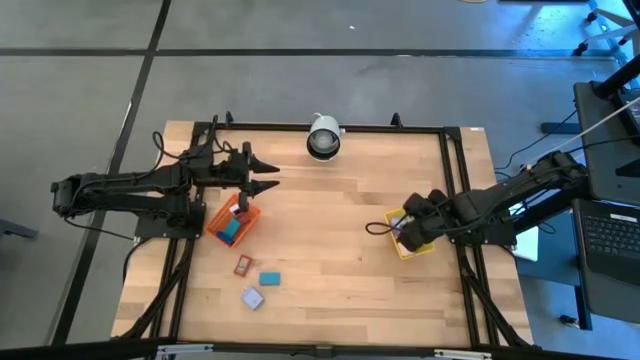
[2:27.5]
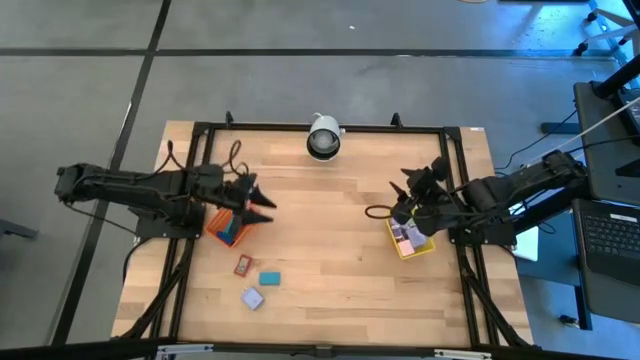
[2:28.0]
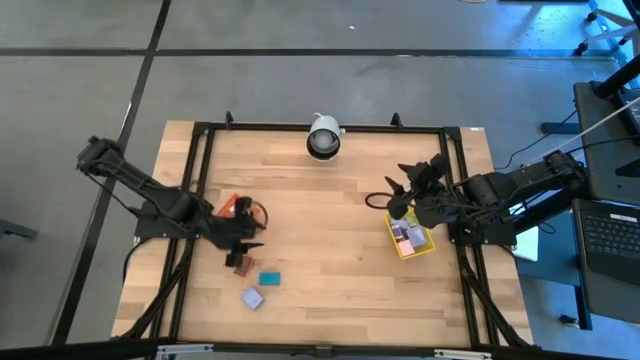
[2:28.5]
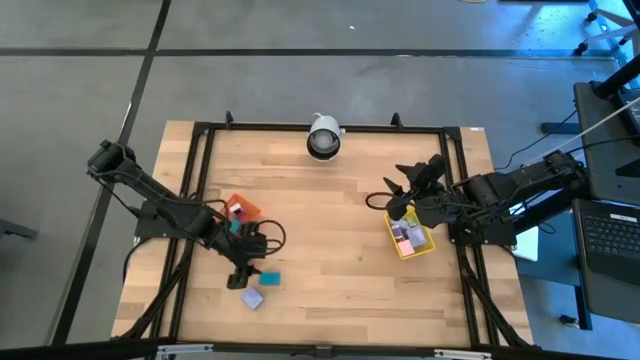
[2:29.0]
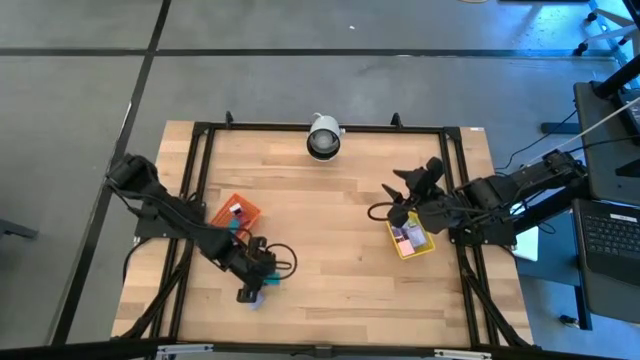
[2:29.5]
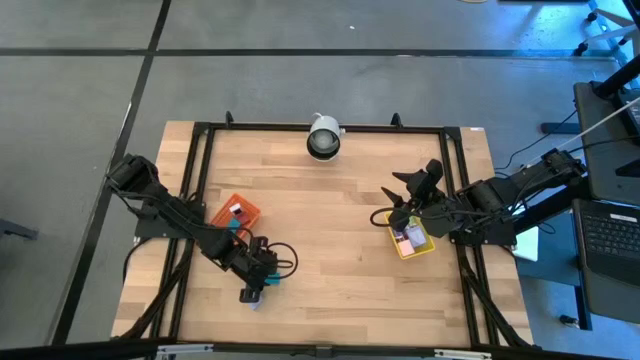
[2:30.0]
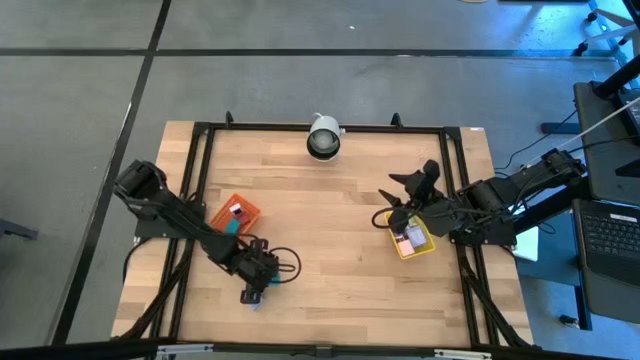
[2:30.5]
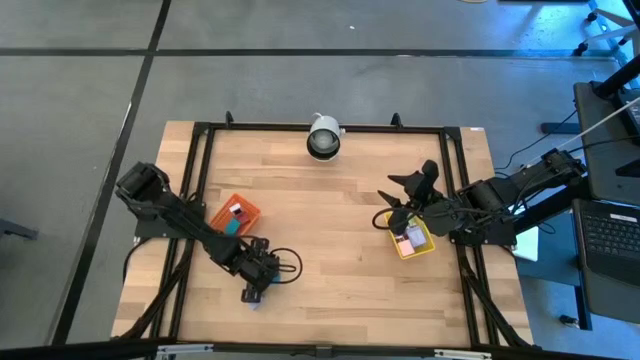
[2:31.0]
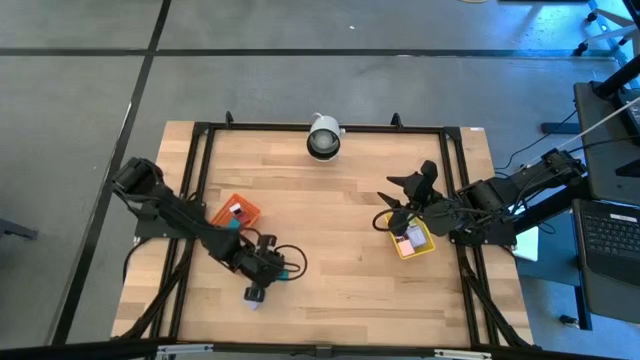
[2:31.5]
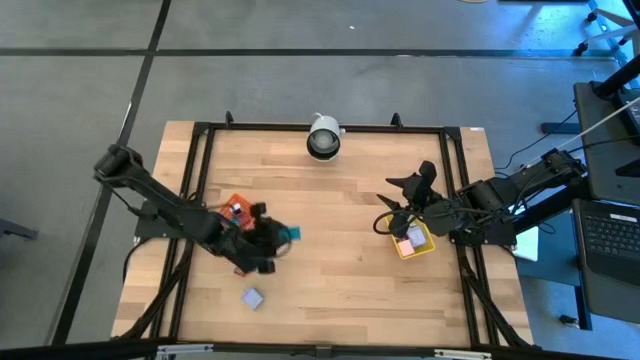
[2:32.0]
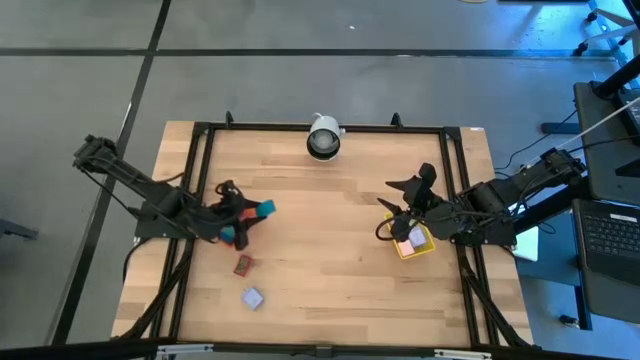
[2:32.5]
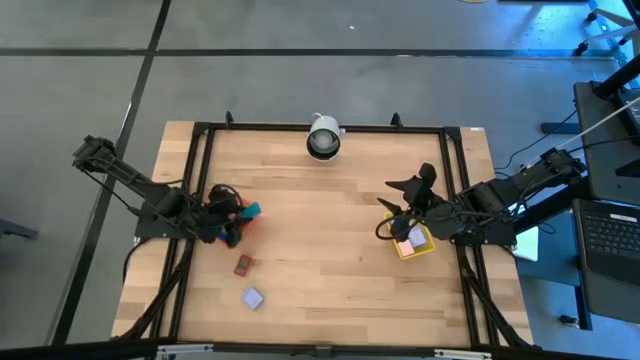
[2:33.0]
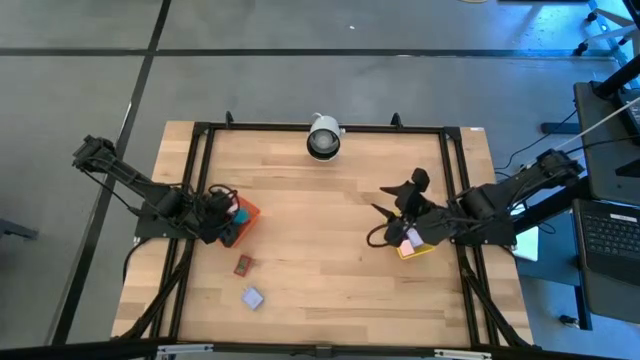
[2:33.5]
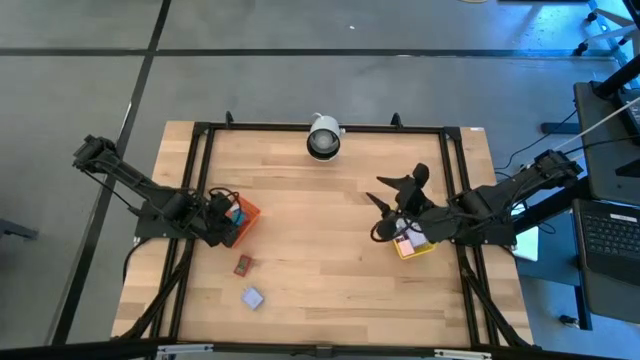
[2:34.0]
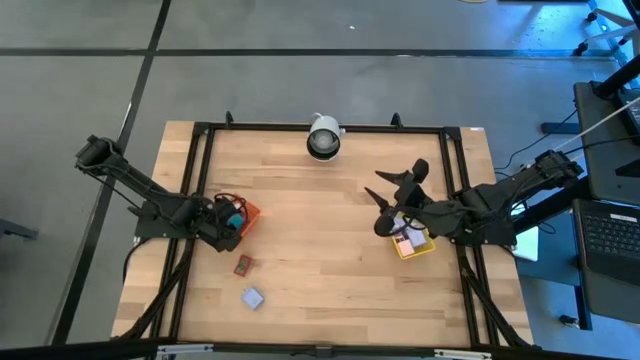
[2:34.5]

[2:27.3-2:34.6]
Task: Pick & Place Office items
Put the light blue digital clock into the orange basket

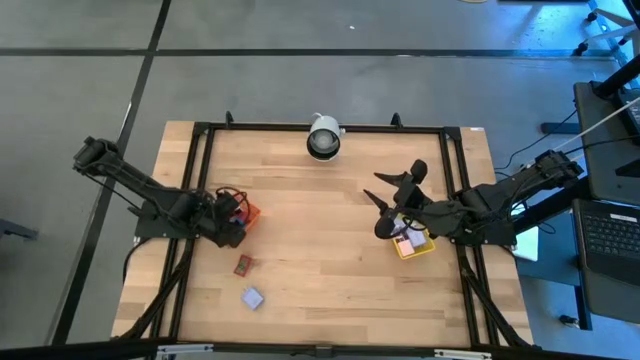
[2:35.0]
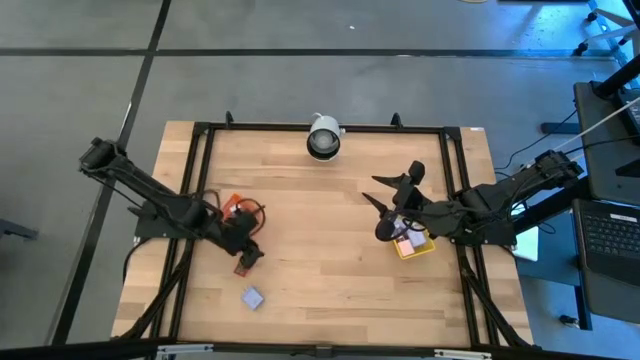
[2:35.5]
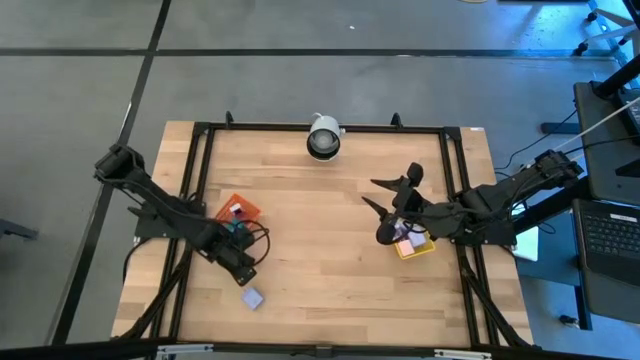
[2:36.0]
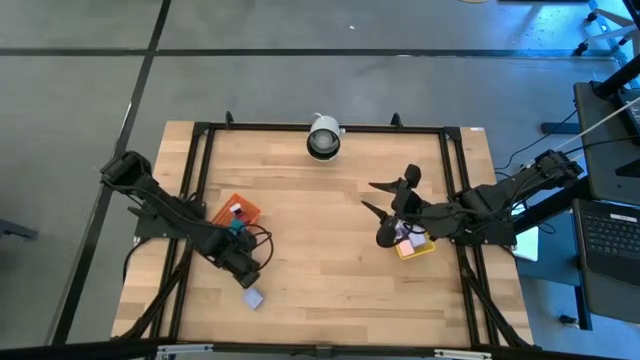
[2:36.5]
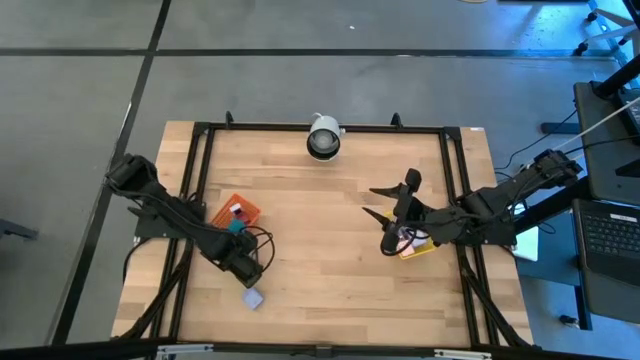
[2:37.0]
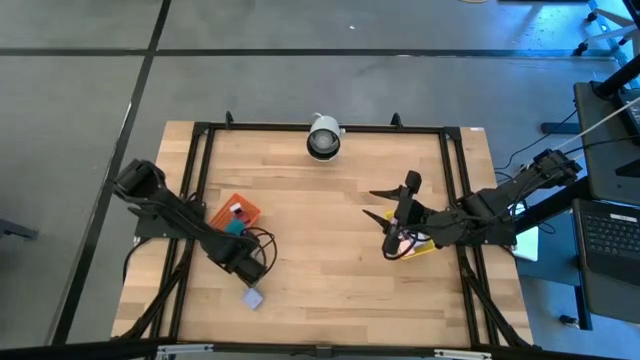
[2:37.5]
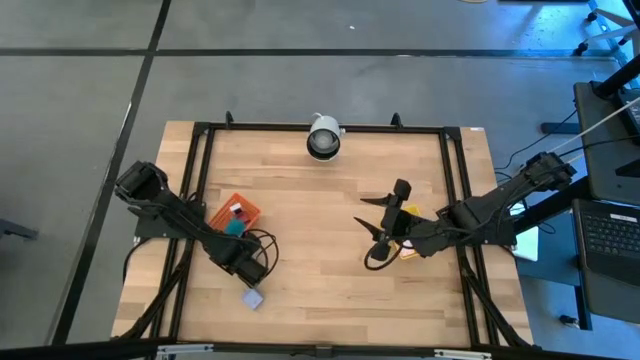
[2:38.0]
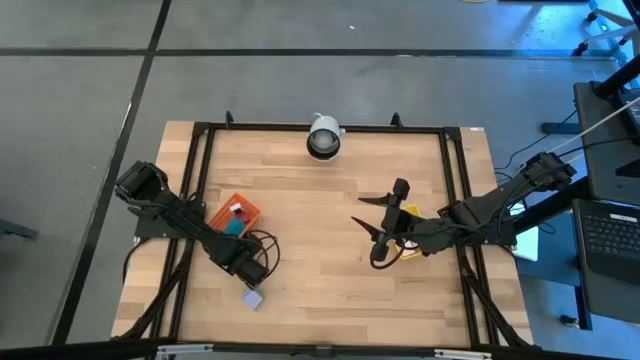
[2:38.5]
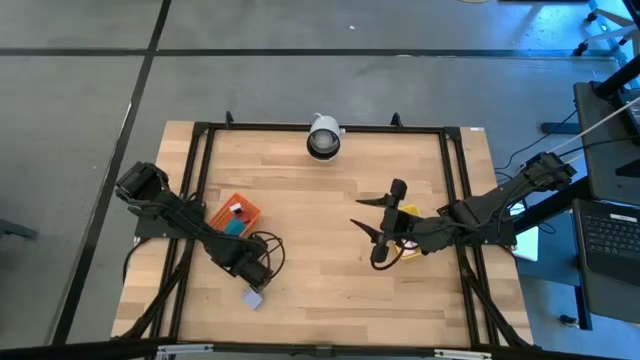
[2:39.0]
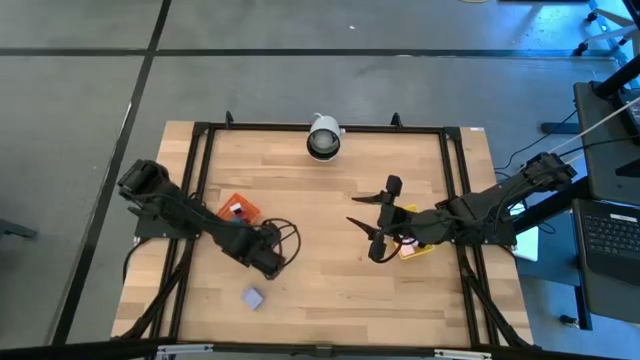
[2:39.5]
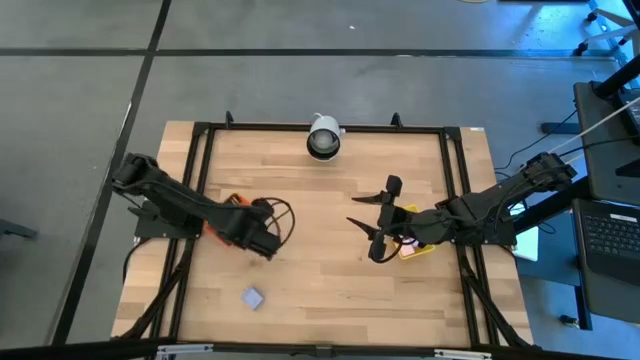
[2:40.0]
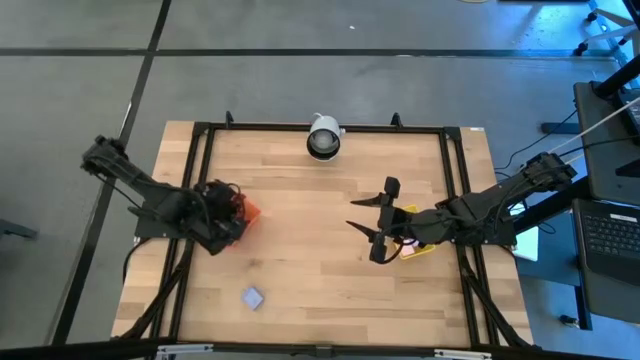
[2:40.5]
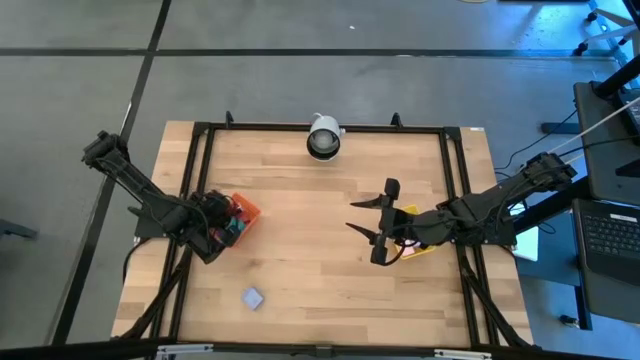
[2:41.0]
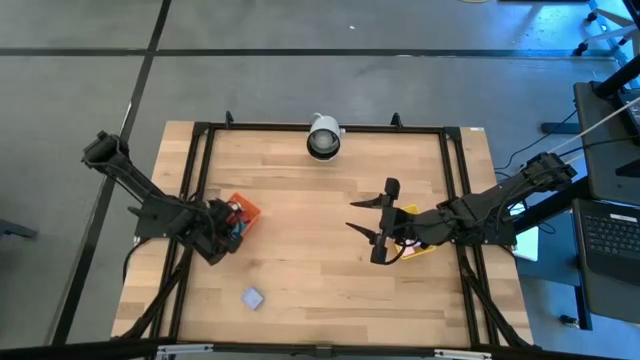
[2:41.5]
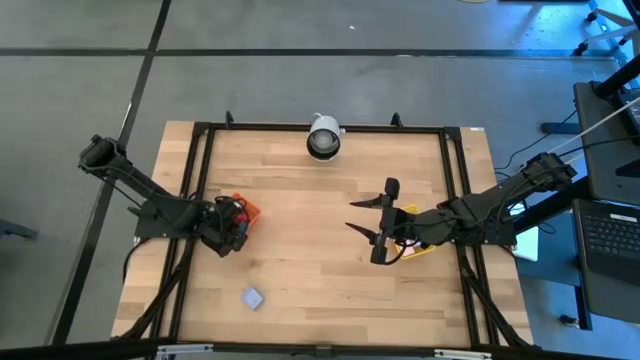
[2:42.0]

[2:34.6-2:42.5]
Put the red digital clock into the orange basket

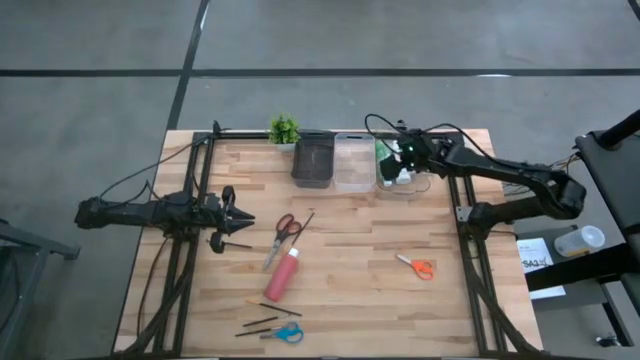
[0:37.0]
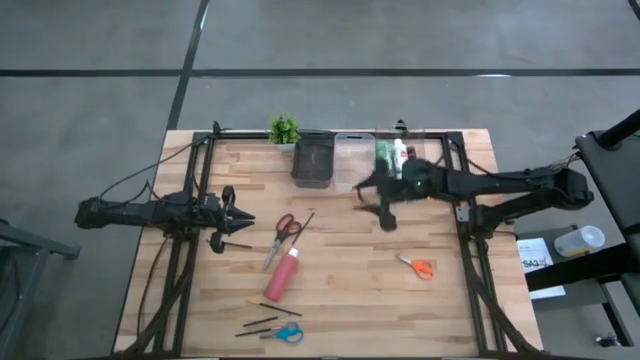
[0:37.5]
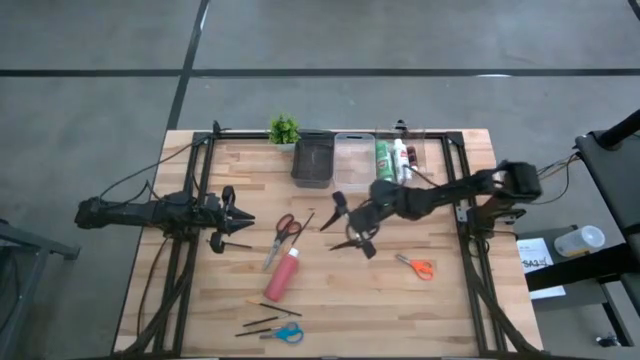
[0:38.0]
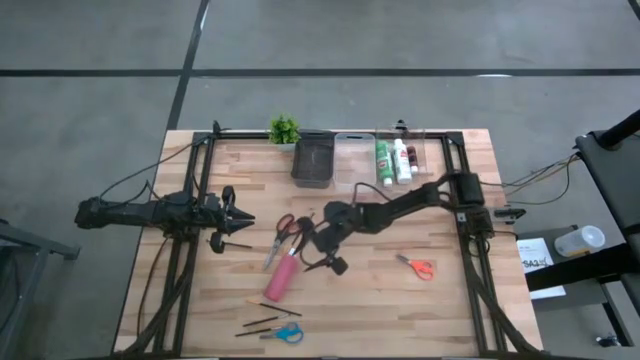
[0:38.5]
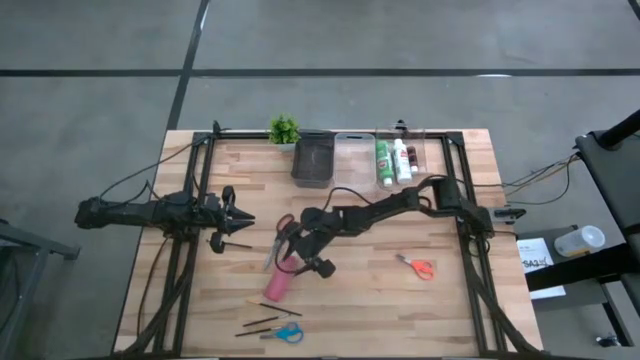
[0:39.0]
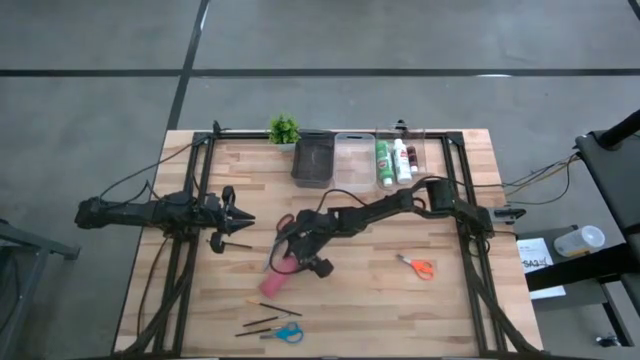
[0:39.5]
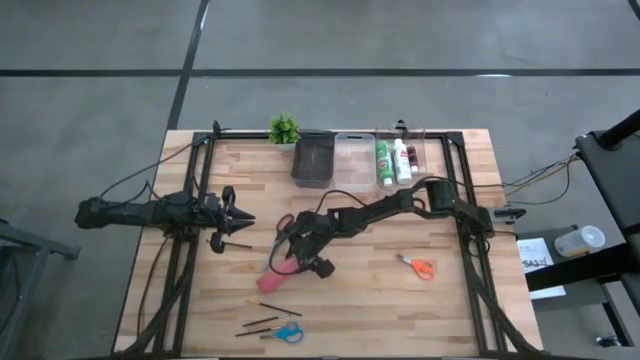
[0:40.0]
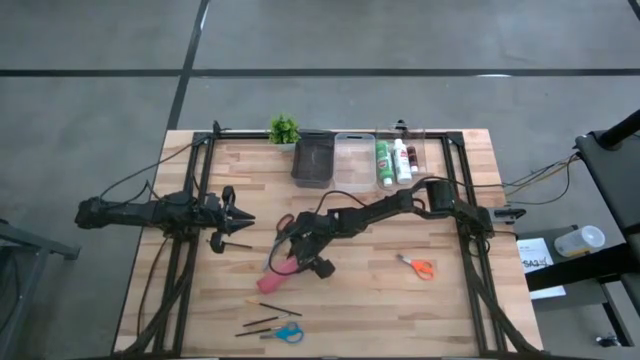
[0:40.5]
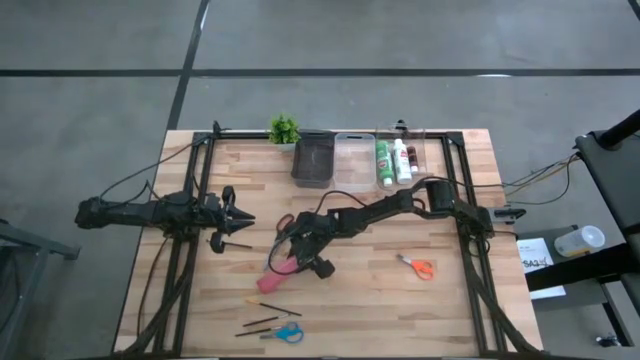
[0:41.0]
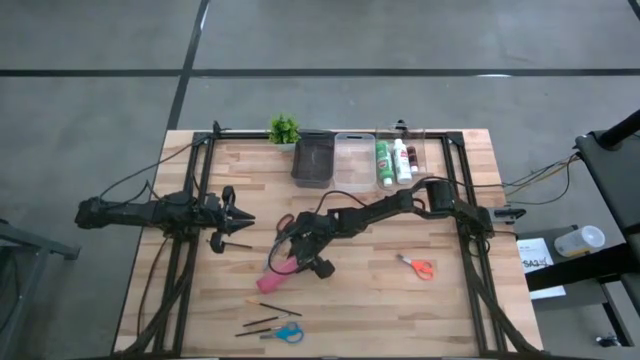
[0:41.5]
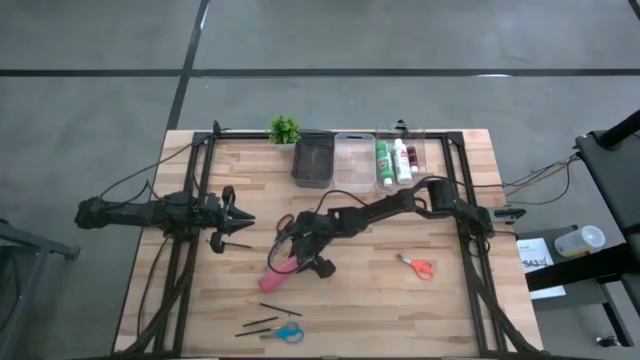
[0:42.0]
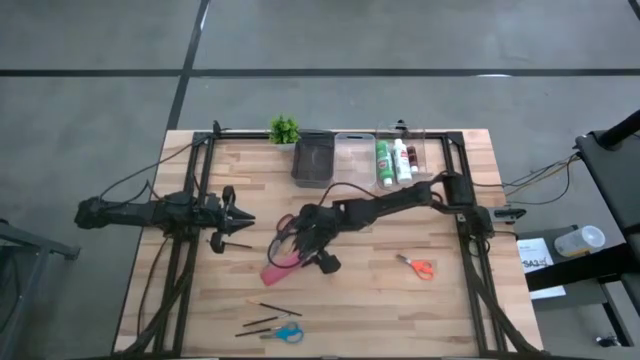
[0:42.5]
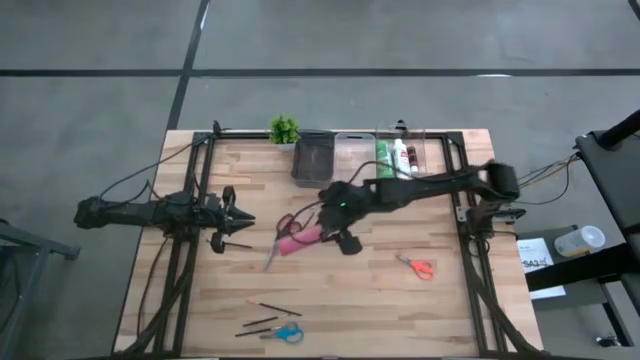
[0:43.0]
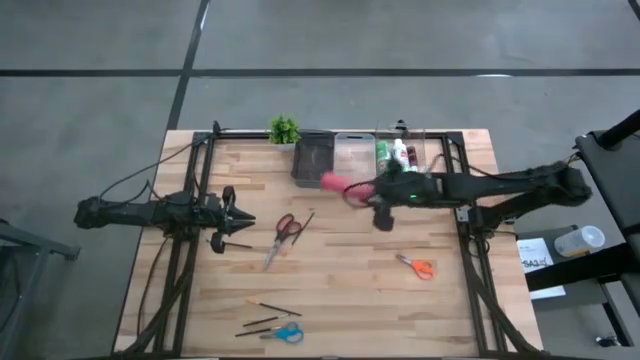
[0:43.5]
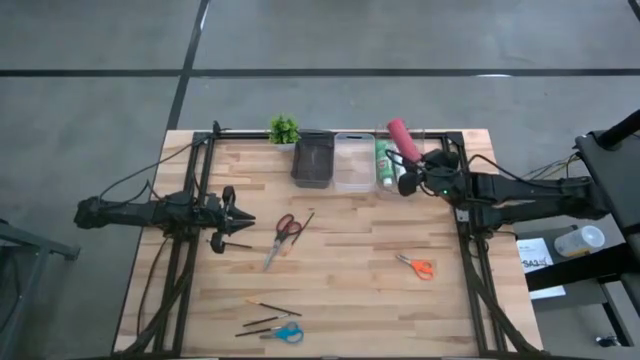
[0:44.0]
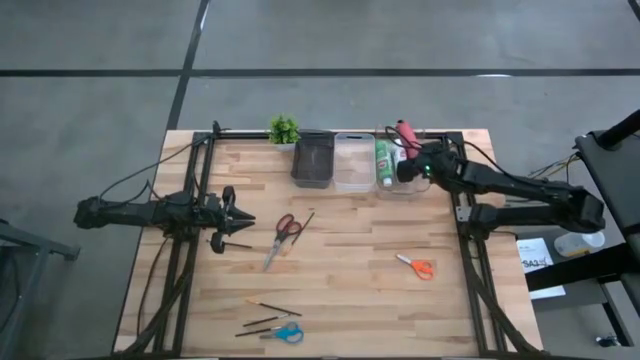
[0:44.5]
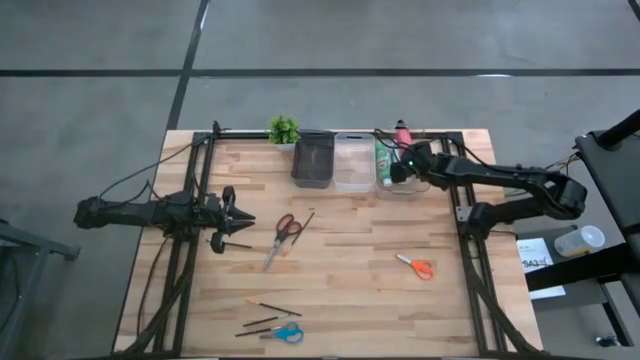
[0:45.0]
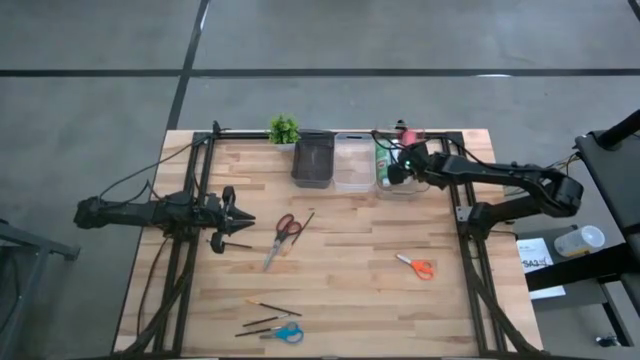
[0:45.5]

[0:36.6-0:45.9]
Task: Pick & Place Paint Supplies
Put the pink paint bottle into the transparent bin
